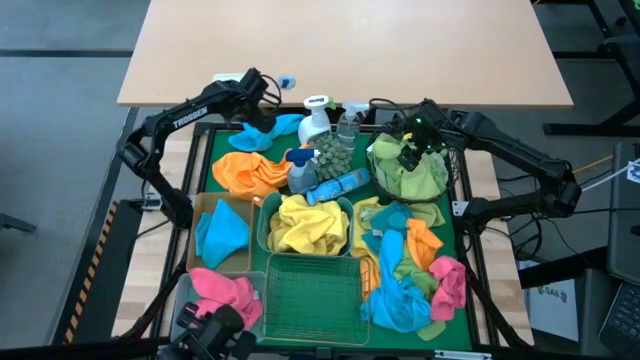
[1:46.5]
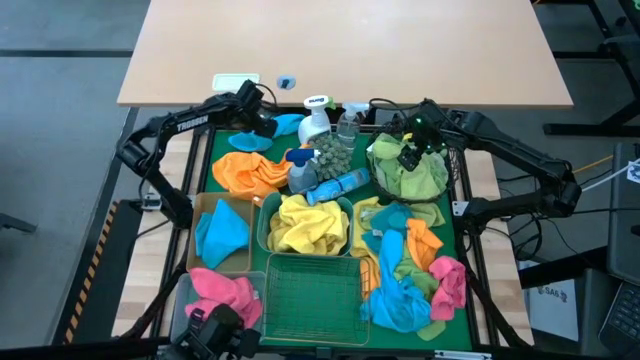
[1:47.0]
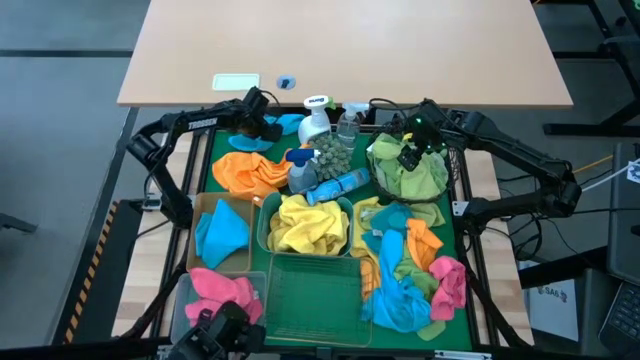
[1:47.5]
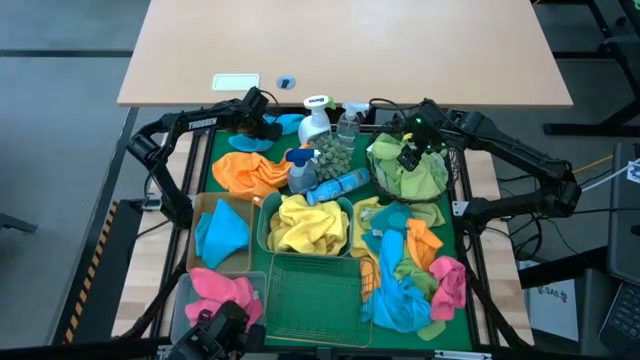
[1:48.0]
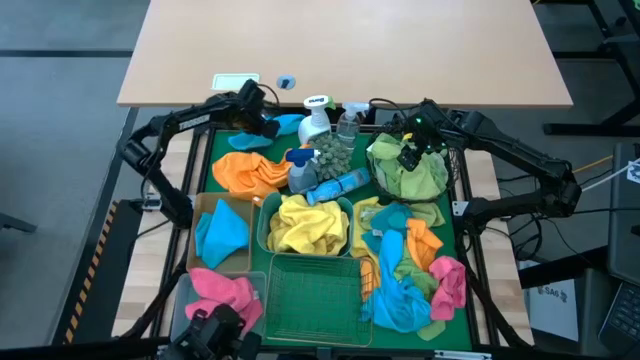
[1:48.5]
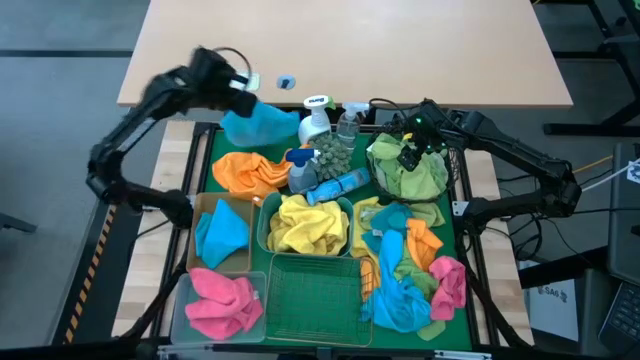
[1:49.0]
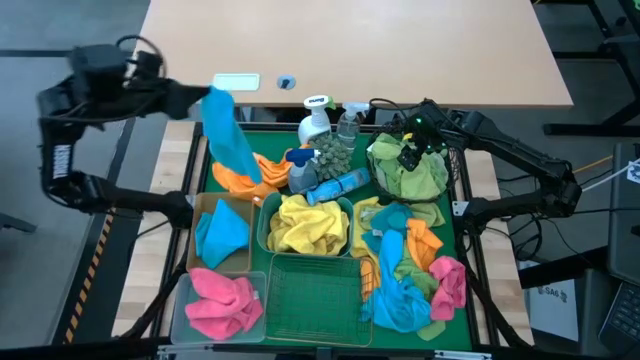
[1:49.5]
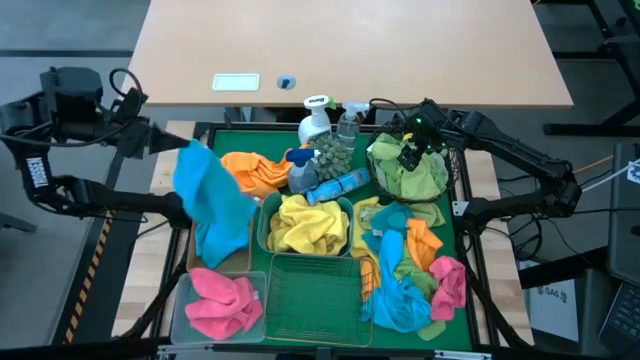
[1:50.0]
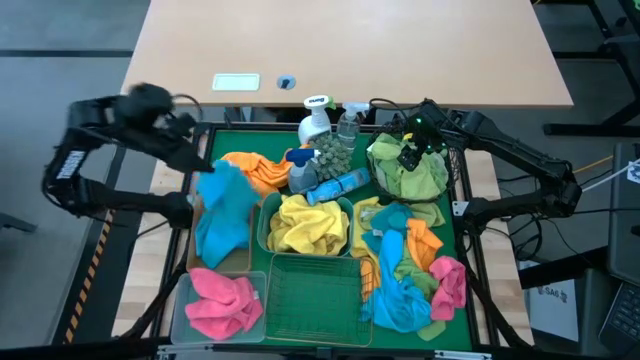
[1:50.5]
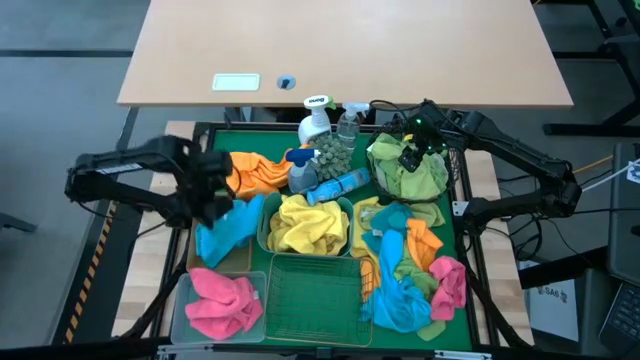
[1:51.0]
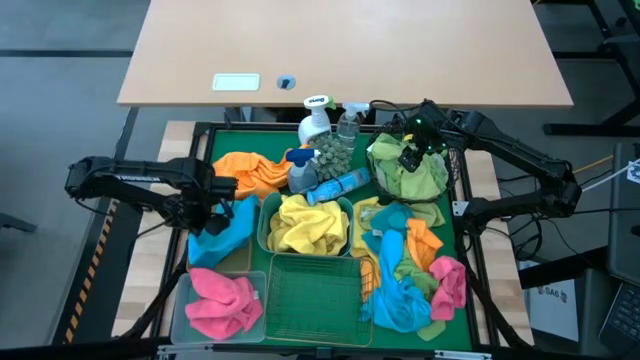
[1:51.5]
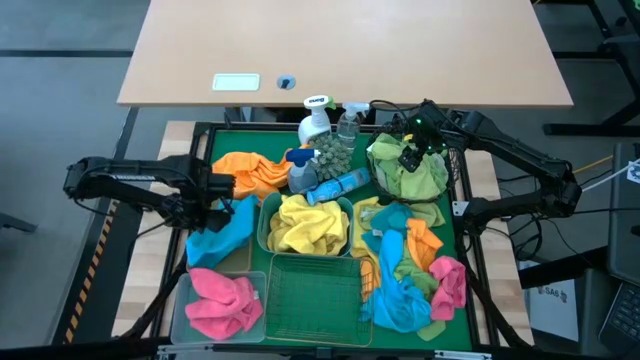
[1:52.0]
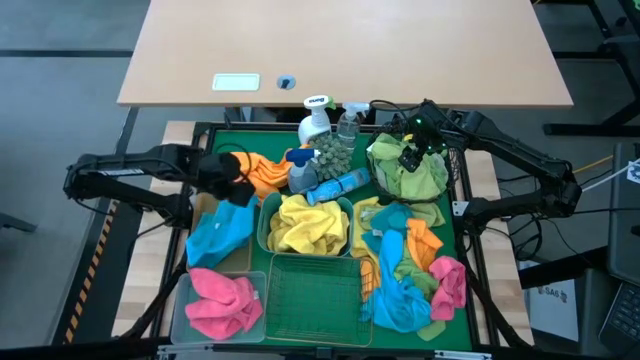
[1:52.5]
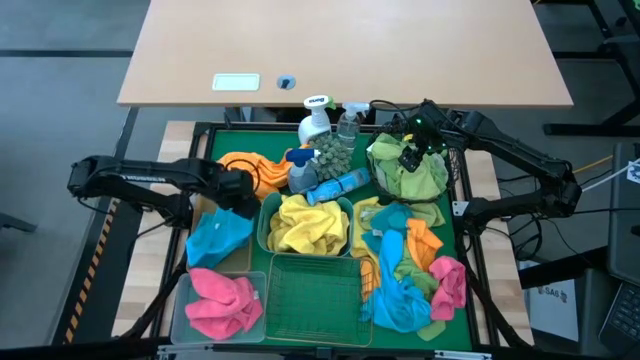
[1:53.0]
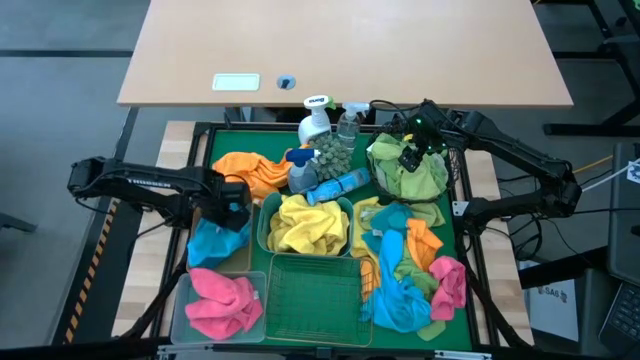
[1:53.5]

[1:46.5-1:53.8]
Task: Sort microfiber towel by color & place in baskets
Put the blue microfiber towel into the orange bin

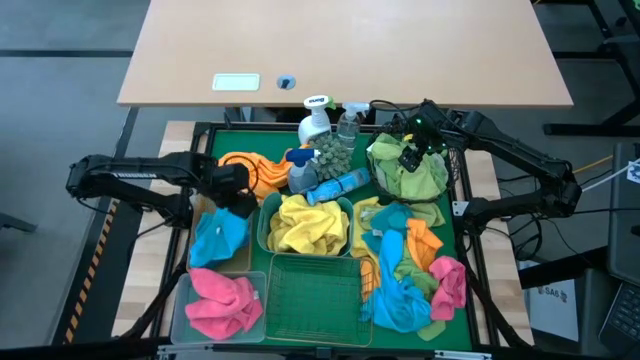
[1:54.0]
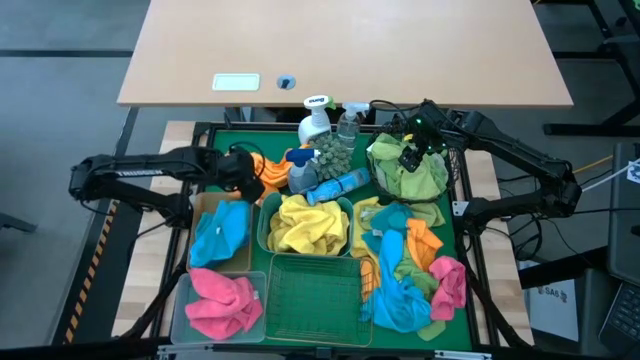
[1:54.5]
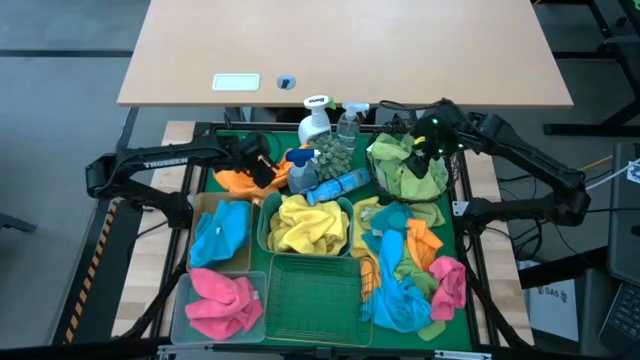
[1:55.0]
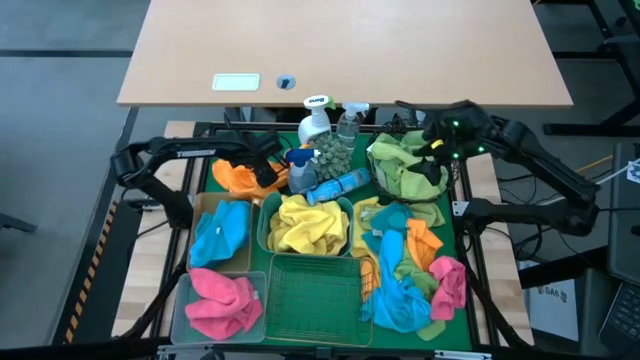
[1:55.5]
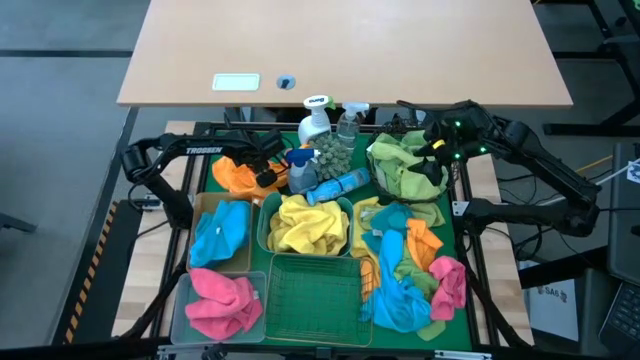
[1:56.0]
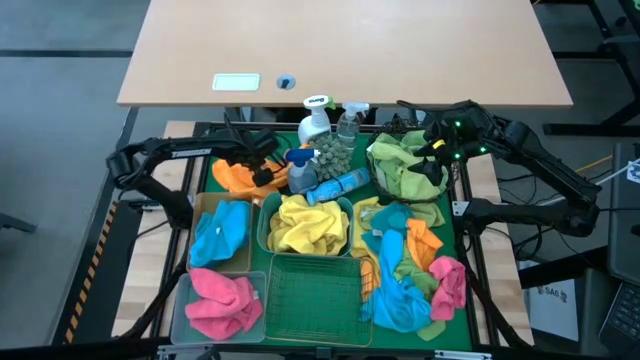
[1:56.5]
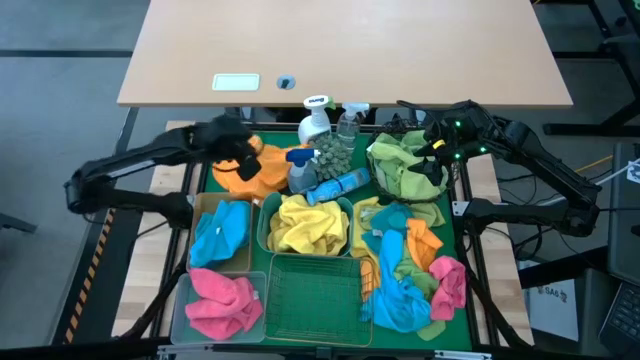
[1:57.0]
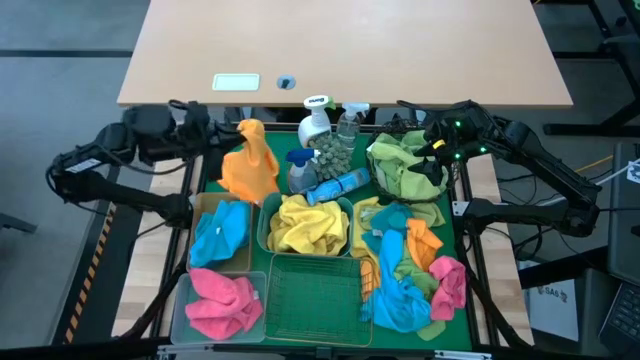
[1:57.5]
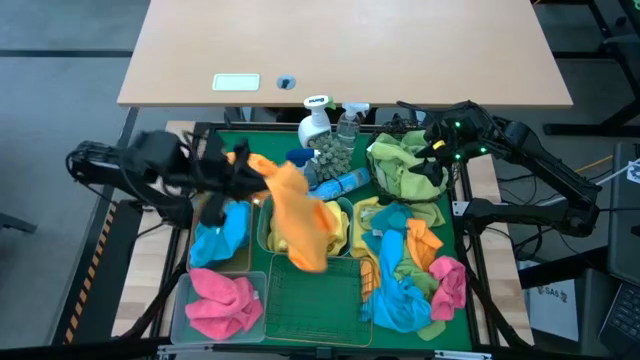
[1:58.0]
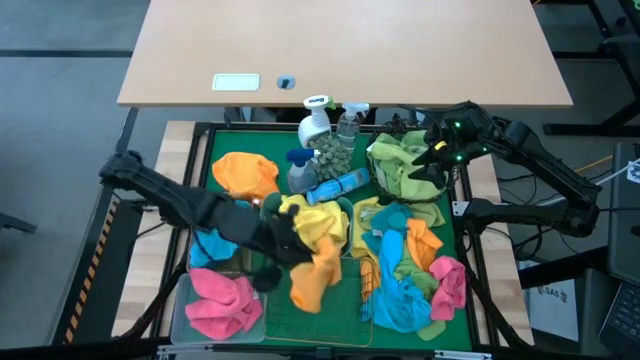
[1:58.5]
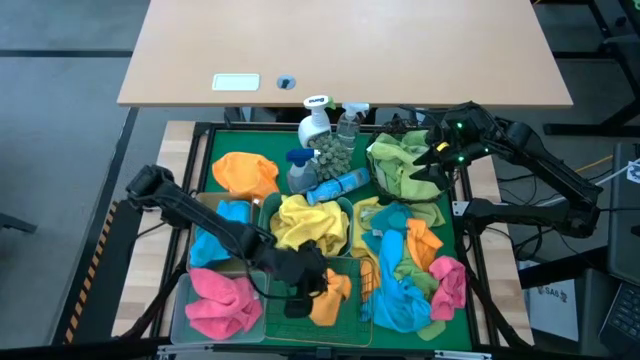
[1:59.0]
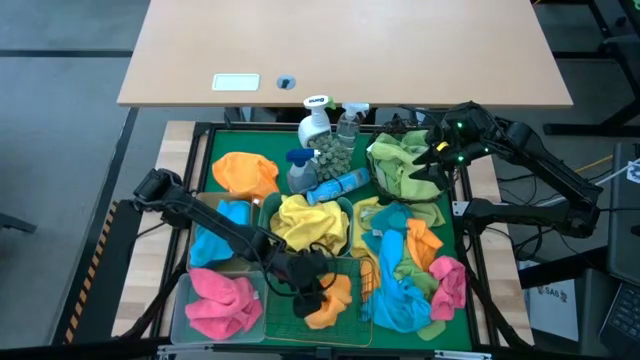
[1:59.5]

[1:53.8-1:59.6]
Put the orange microfiber towel into the gold wire basket

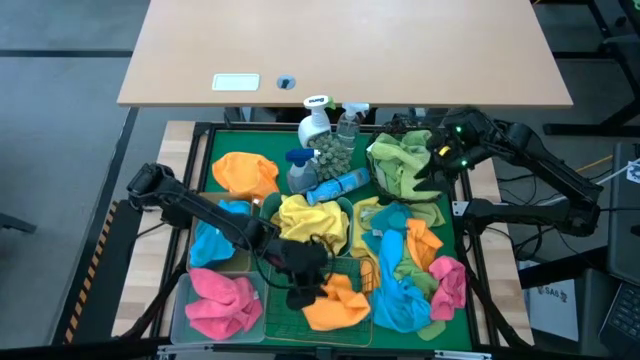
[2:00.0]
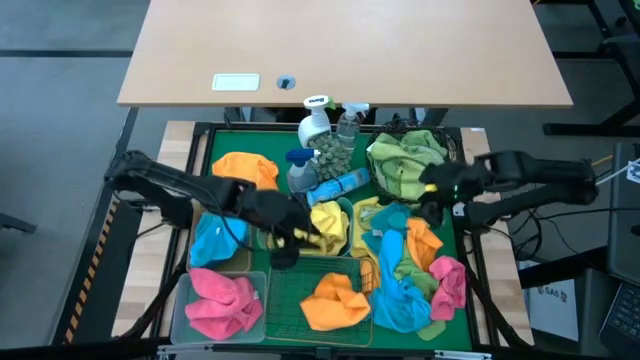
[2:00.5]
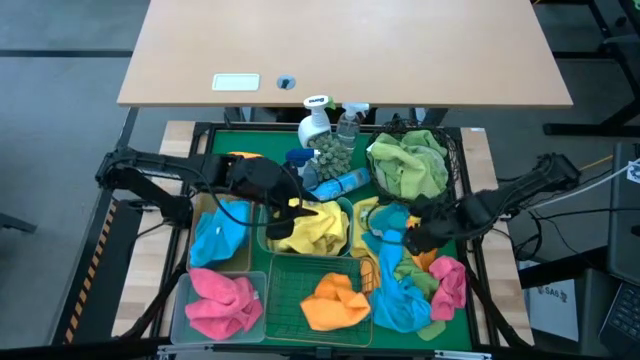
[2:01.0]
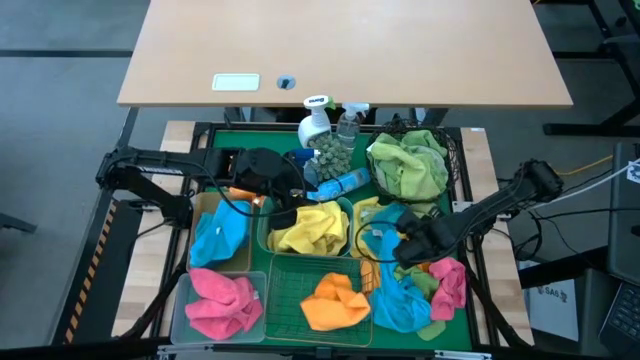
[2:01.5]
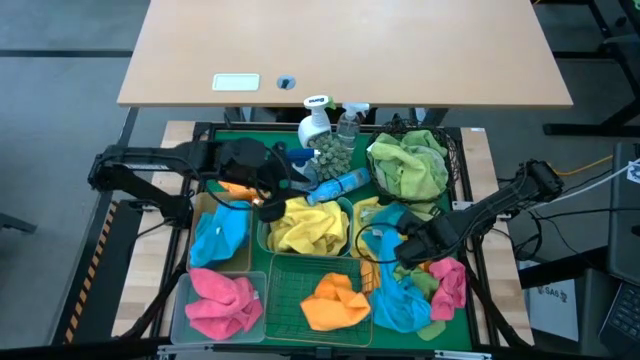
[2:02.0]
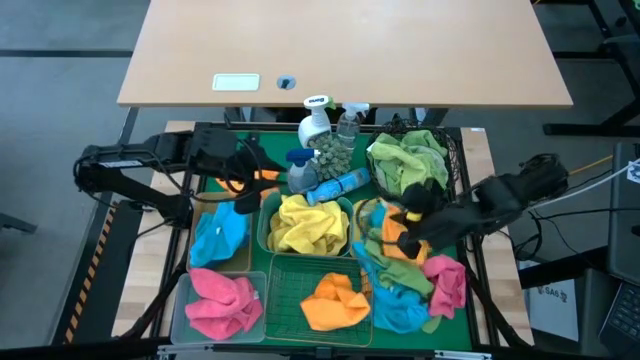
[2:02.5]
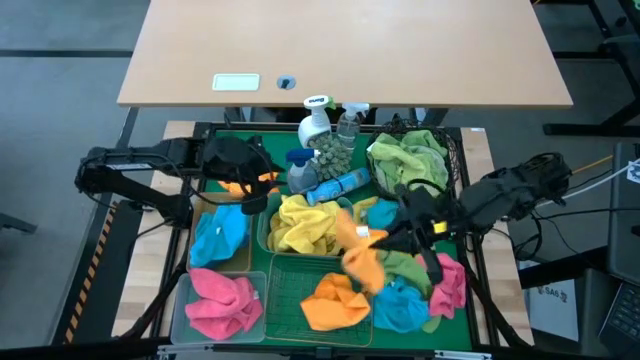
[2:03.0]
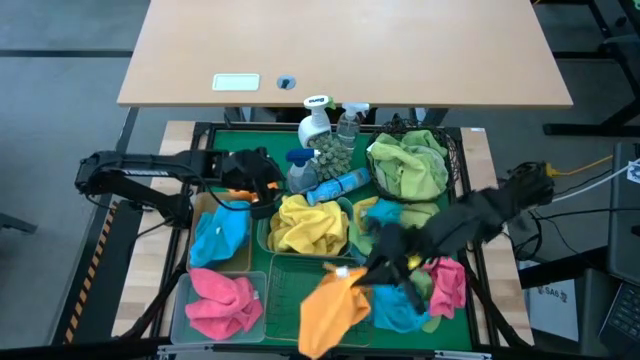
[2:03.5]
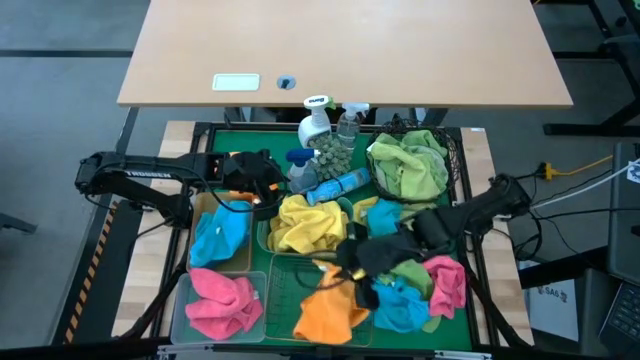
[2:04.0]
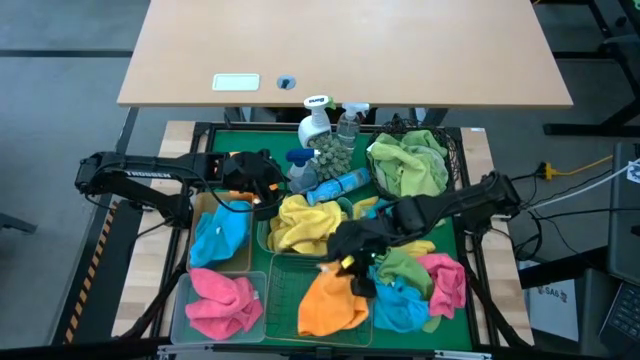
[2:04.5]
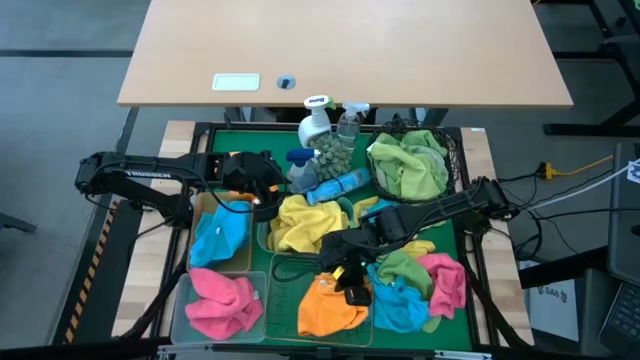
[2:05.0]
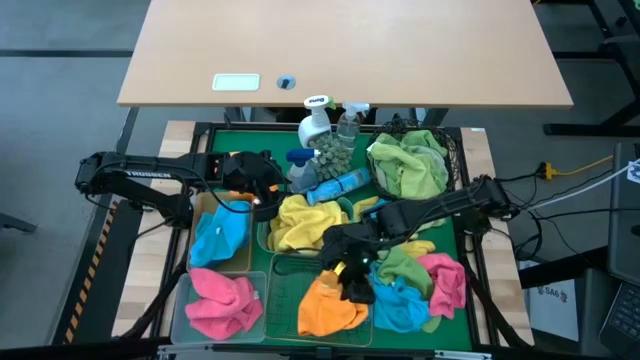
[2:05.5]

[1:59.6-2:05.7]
Put the orange microfiber towel into the gold wire basket

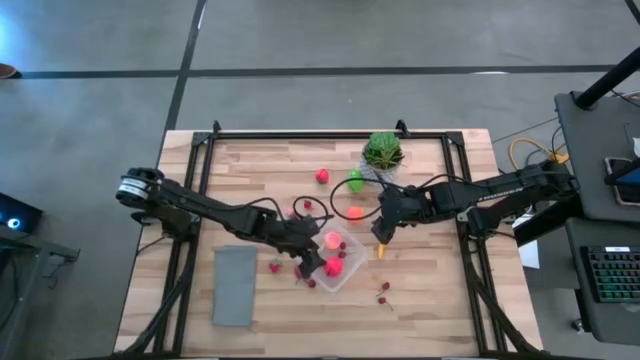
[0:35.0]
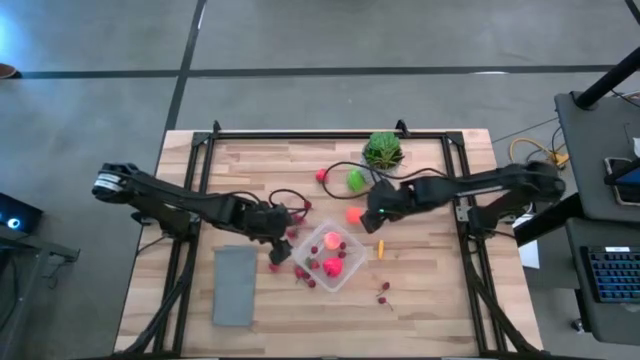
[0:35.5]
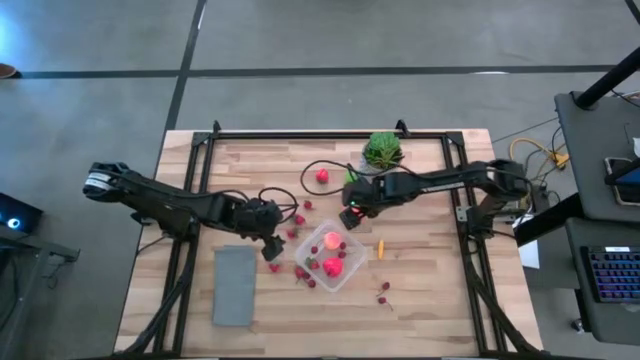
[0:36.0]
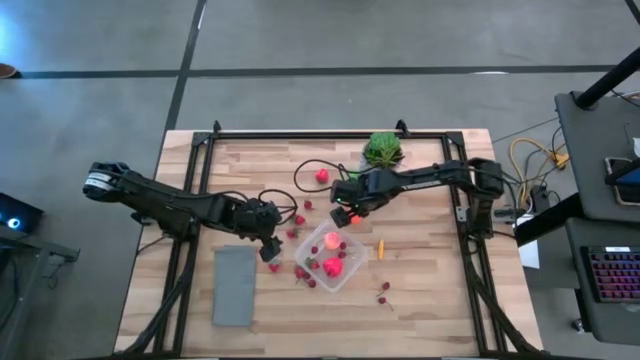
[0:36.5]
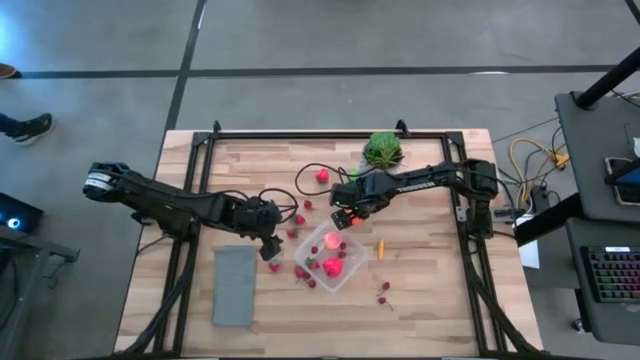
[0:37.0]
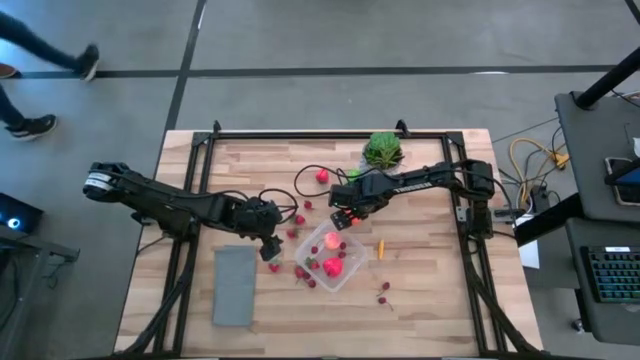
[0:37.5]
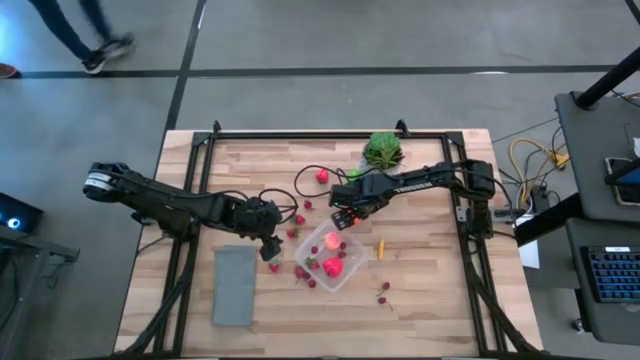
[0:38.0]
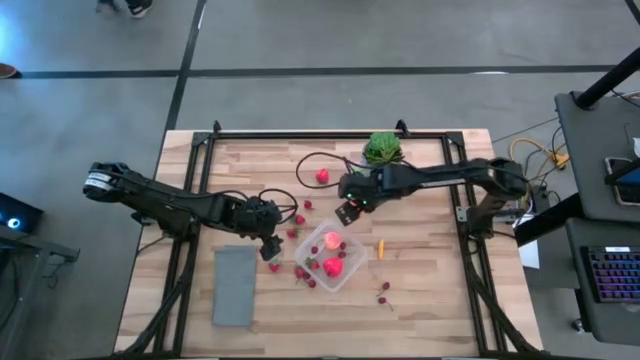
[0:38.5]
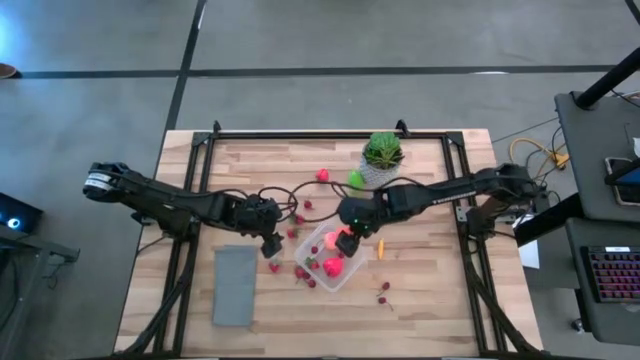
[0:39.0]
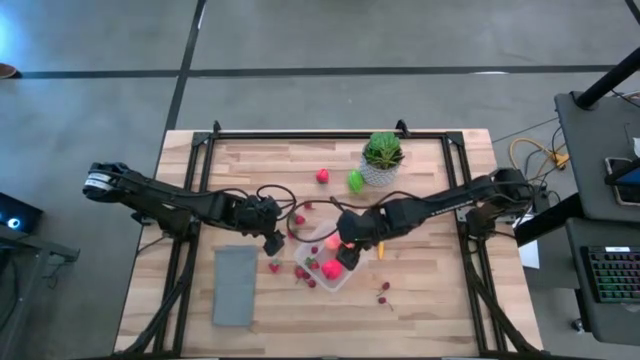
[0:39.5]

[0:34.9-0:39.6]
Task: Pick and placing Produce into tupperware
Put the orange pumpkin into the bin
